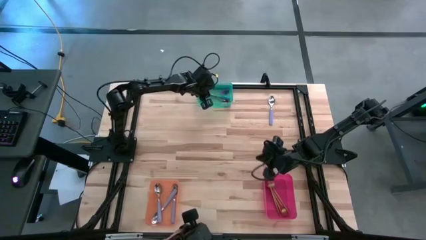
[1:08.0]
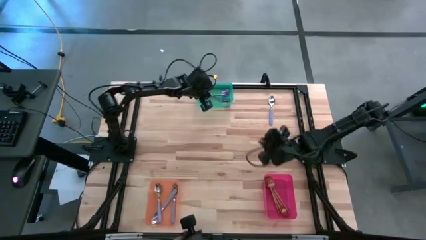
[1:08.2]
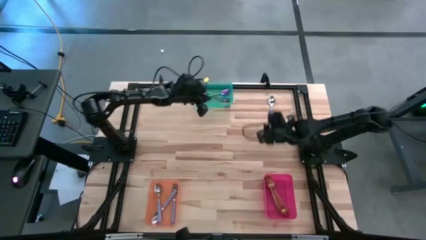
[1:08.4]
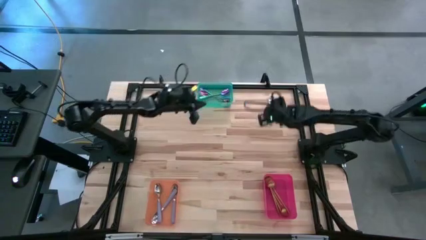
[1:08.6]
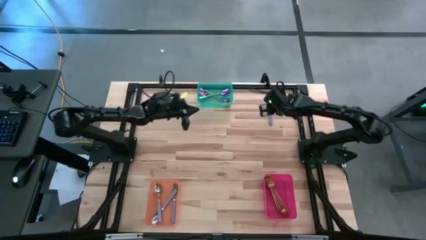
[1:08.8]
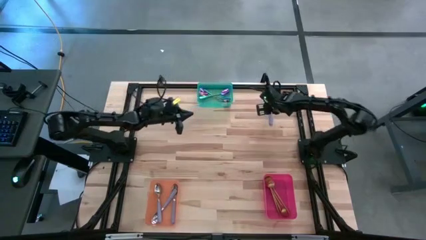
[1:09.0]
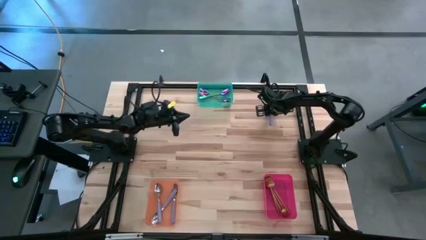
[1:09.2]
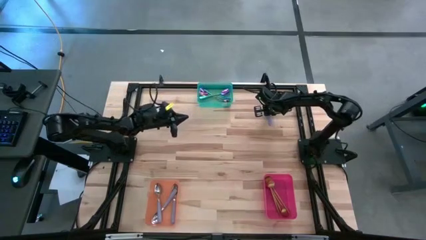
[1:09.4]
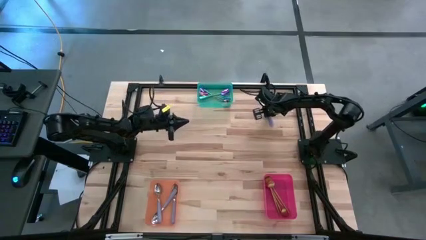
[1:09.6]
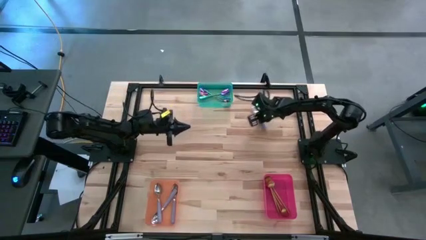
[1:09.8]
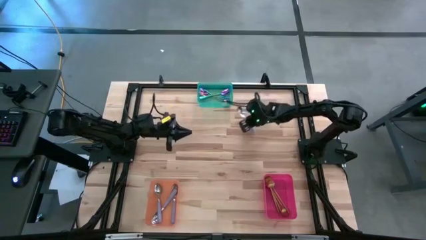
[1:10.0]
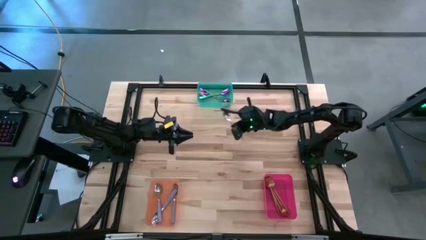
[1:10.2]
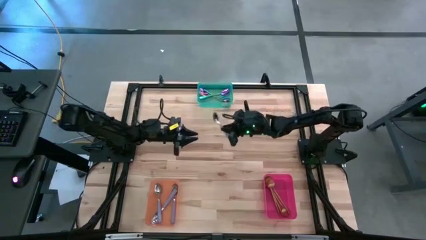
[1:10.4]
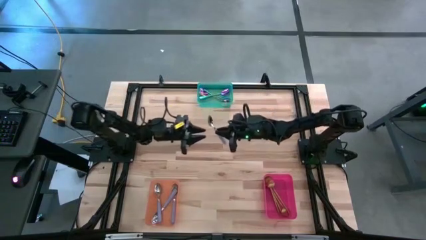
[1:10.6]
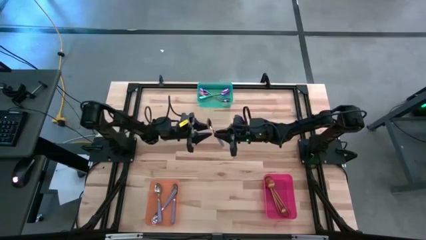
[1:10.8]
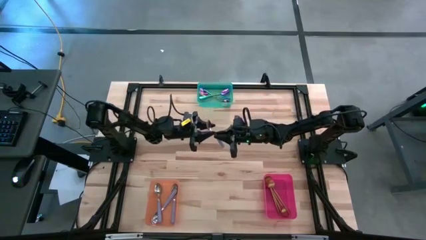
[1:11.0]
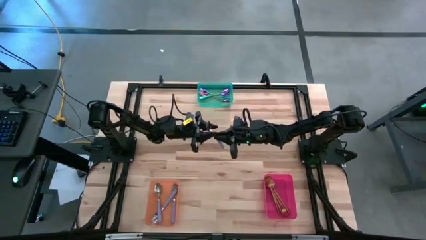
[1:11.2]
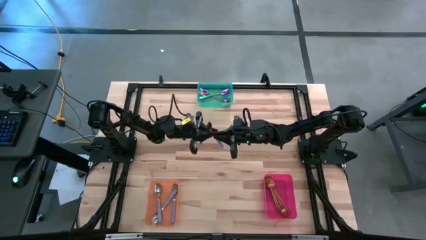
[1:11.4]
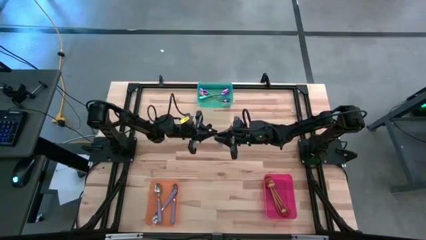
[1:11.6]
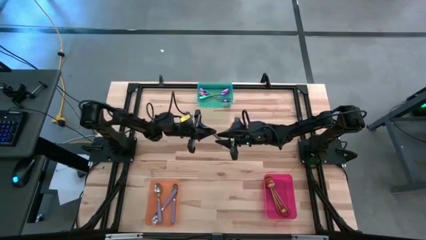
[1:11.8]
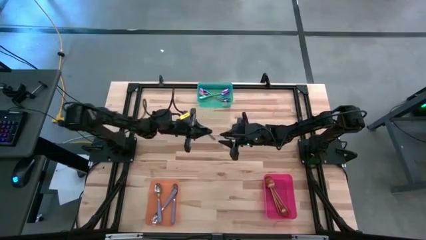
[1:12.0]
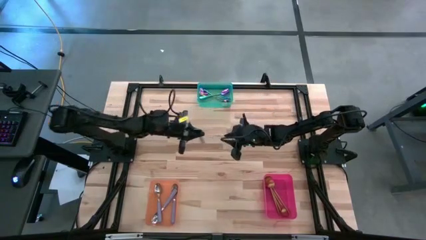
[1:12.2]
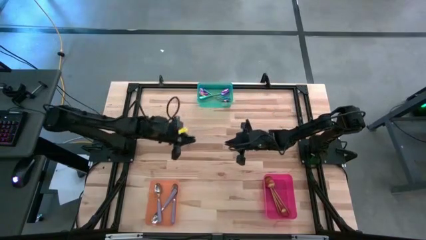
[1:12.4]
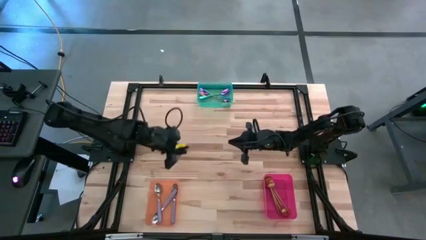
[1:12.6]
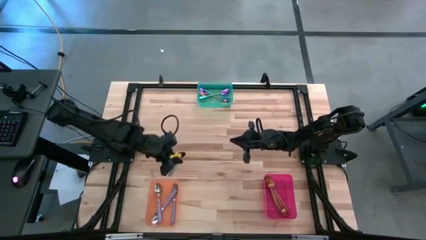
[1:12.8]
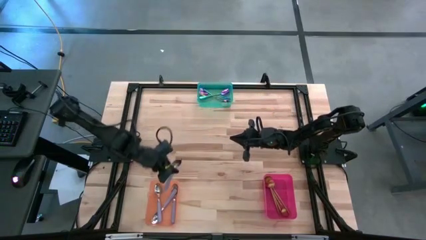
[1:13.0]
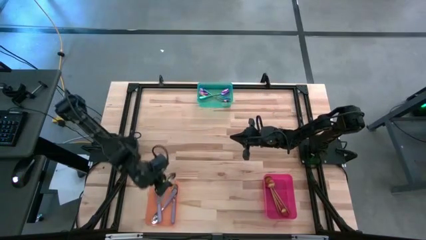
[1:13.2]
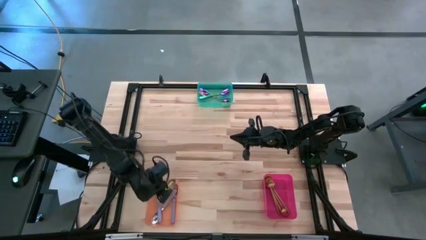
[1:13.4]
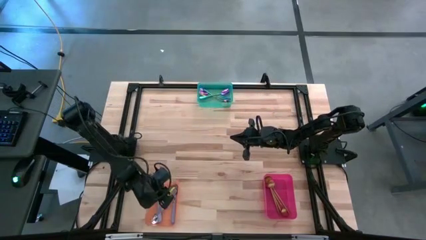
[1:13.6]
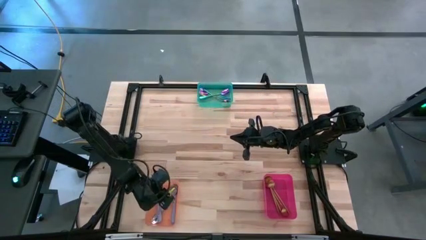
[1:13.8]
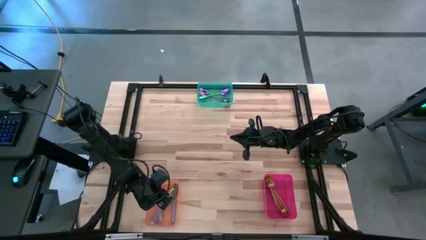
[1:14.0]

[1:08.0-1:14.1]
Task: Sort silverware by color (type)
Put the purple spoon into the orange bin

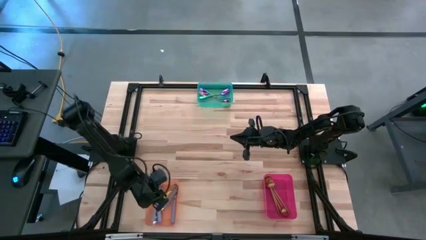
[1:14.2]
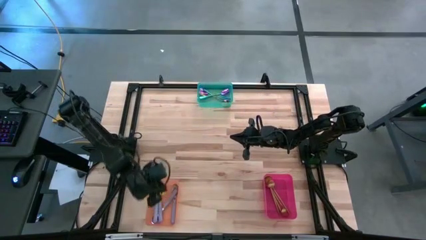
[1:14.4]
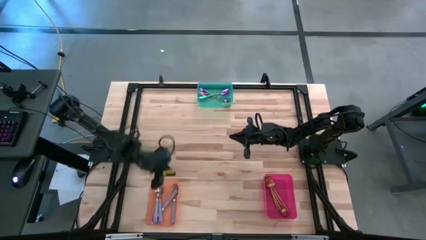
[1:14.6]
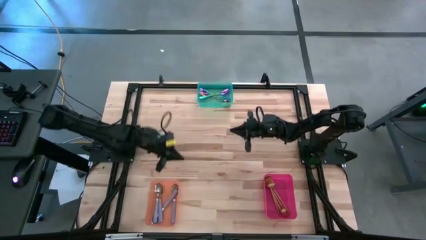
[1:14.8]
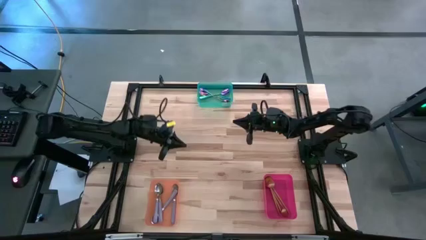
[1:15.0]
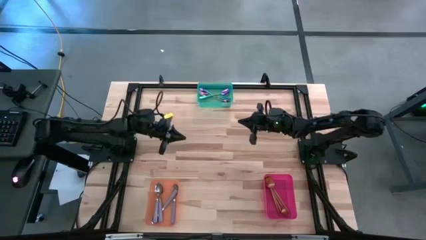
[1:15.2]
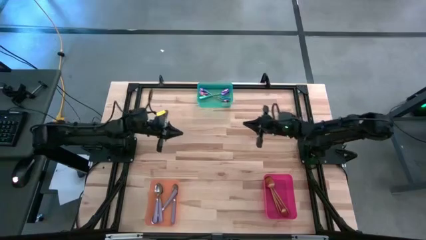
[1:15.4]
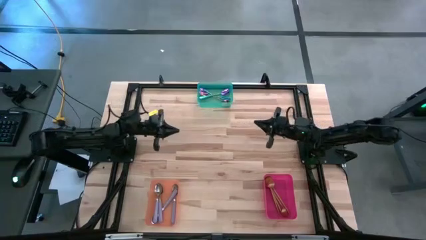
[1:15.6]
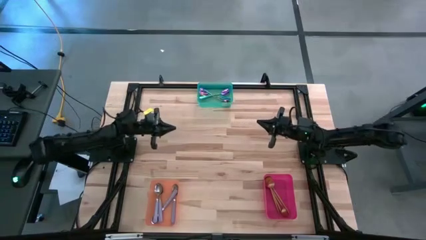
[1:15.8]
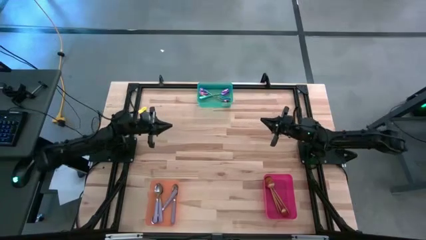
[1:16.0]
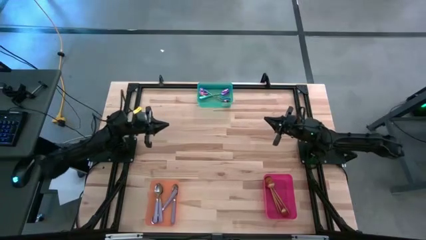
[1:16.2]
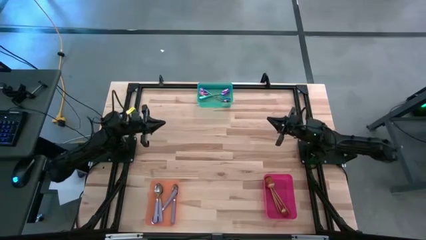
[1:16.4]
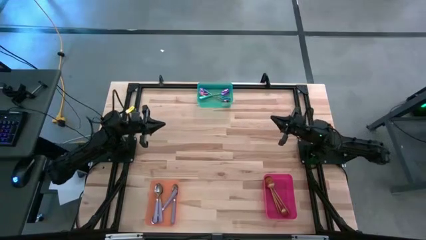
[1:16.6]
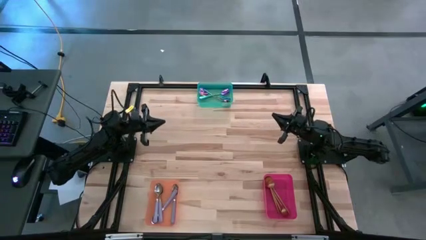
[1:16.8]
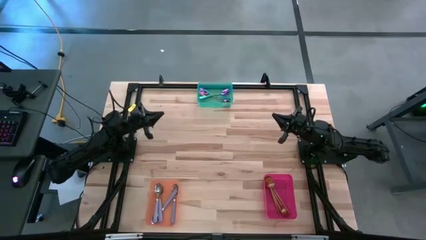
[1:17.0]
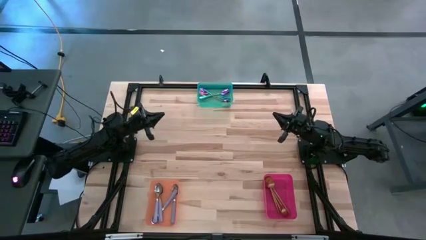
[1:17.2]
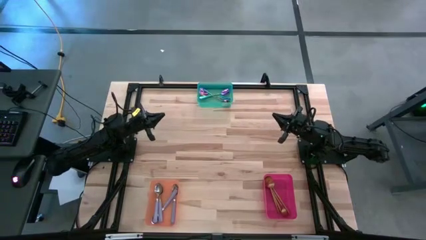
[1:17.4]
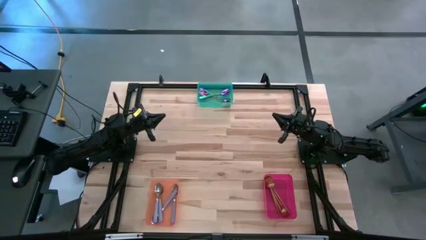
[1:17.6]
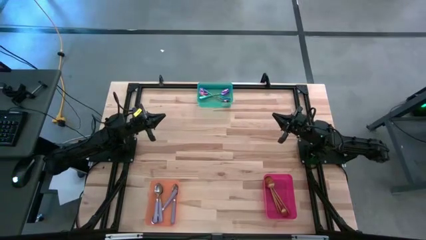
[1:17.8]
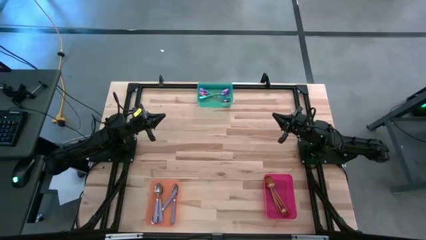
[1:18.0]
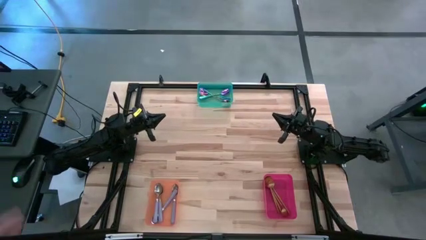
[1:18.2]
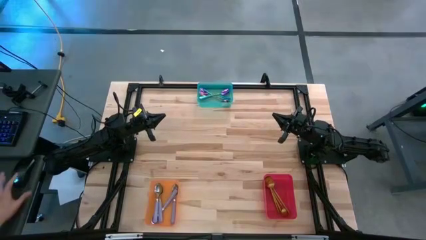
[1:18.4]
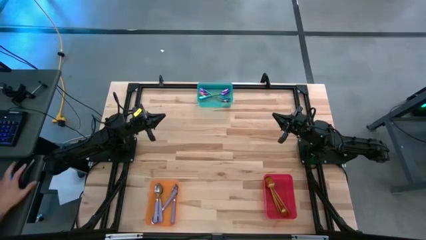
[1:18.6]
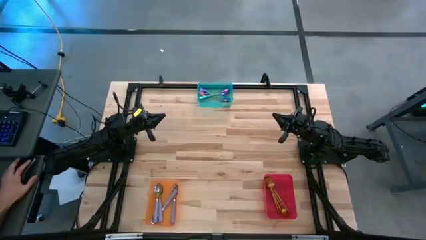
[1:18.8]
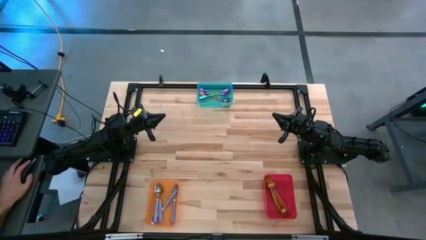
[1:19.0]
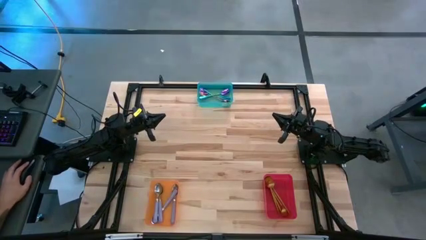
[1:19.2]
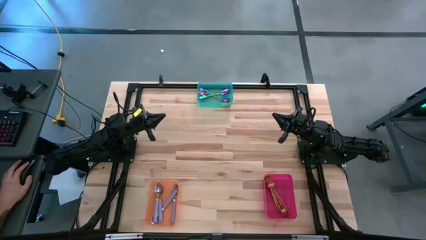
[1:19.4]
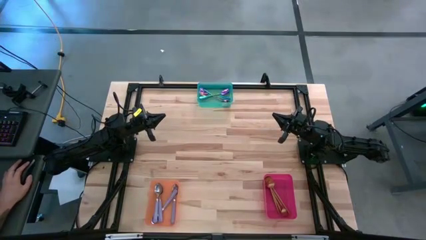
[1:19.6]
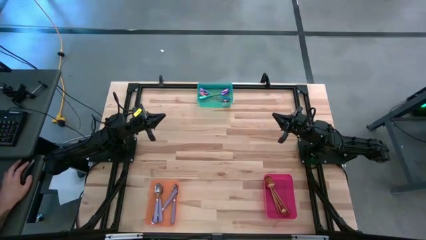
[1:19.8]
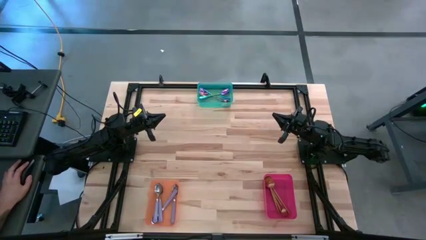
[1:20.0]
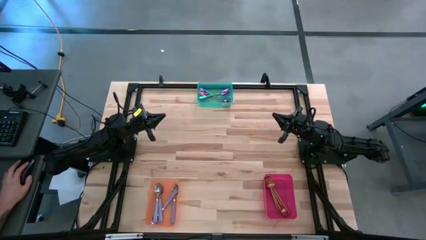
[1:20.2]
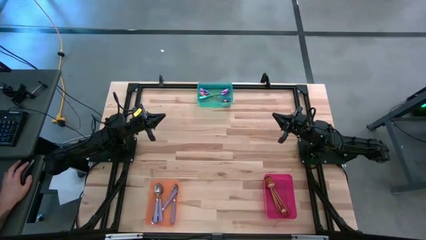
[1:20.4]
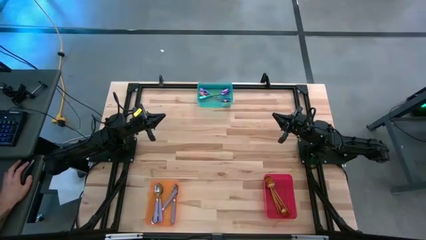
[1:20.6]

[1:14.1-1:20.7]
Return to Home Position

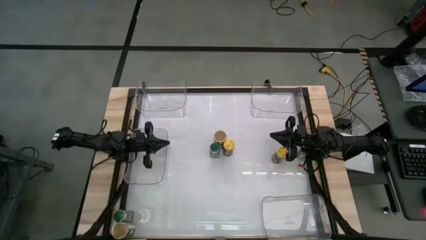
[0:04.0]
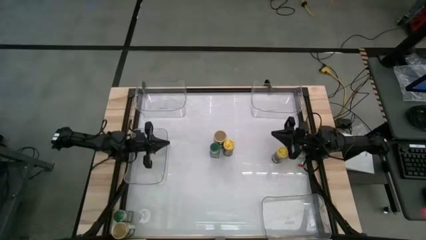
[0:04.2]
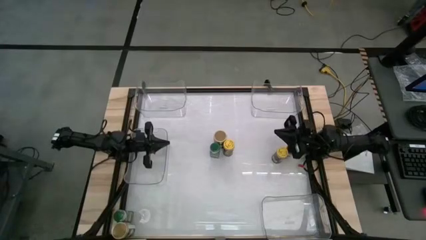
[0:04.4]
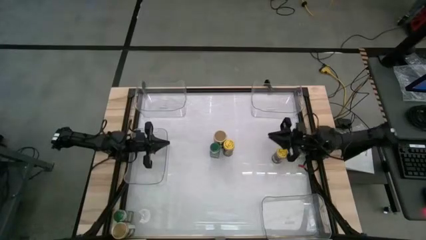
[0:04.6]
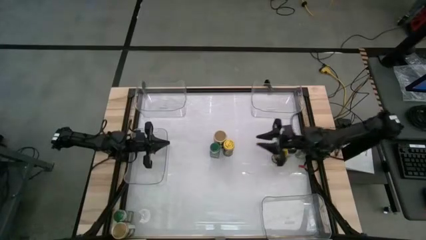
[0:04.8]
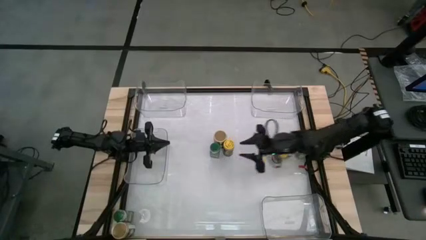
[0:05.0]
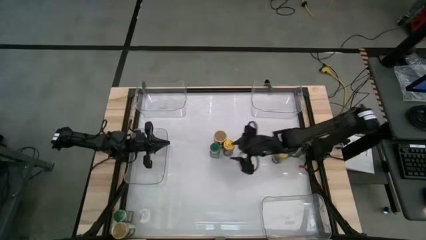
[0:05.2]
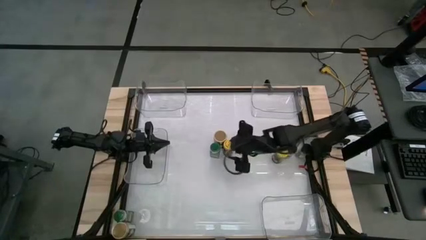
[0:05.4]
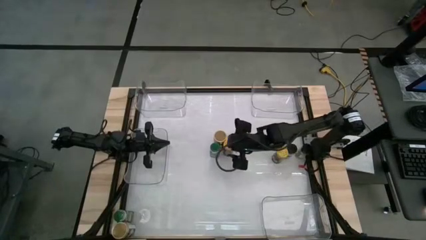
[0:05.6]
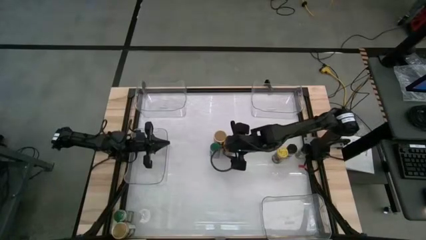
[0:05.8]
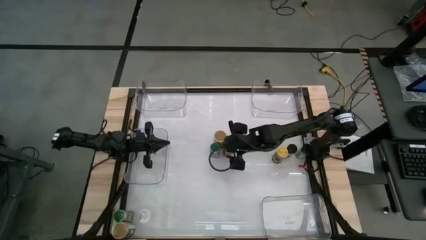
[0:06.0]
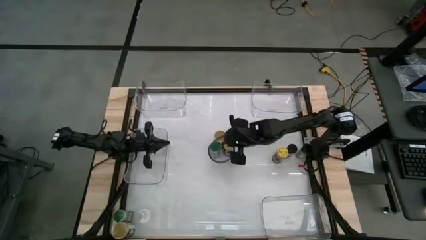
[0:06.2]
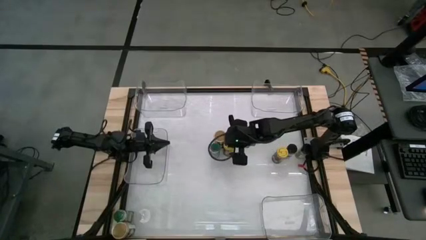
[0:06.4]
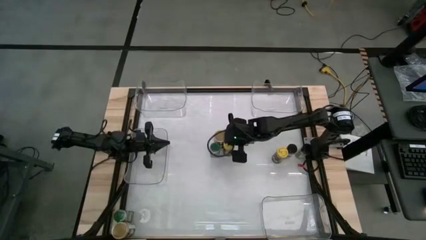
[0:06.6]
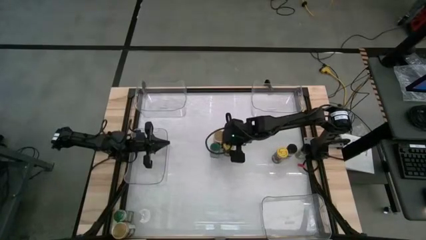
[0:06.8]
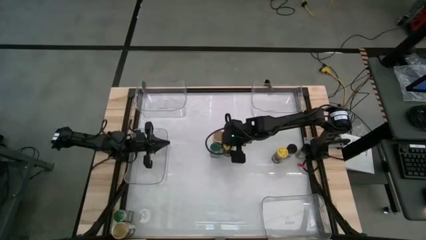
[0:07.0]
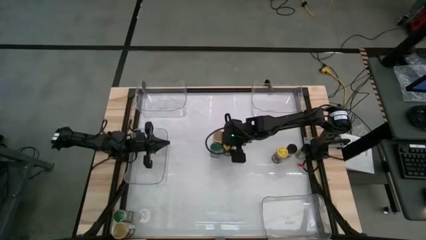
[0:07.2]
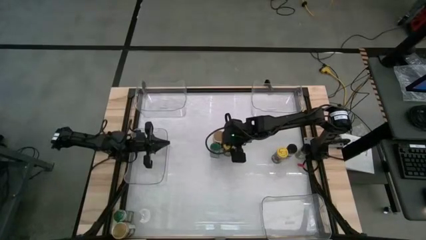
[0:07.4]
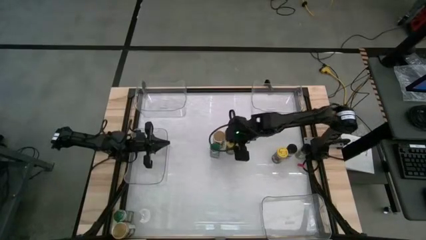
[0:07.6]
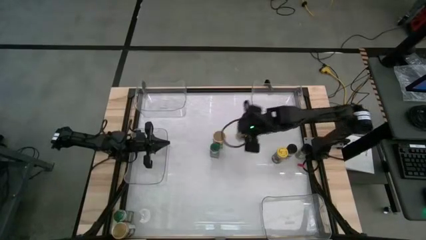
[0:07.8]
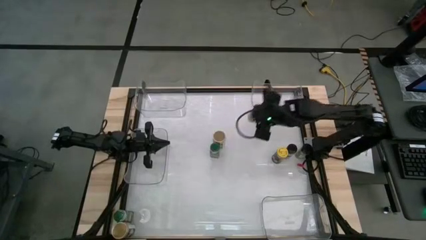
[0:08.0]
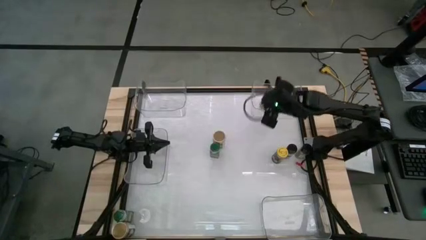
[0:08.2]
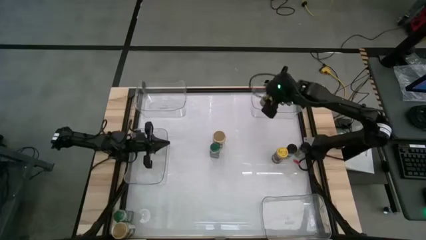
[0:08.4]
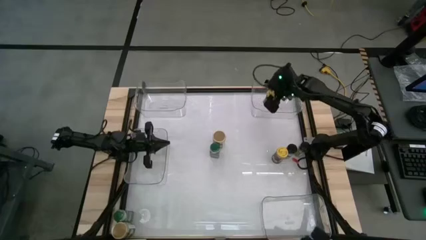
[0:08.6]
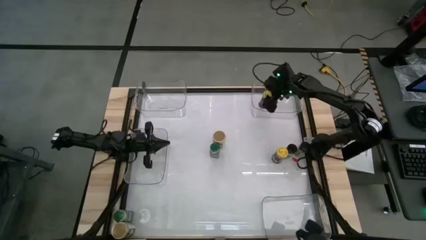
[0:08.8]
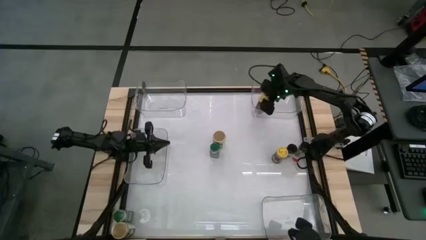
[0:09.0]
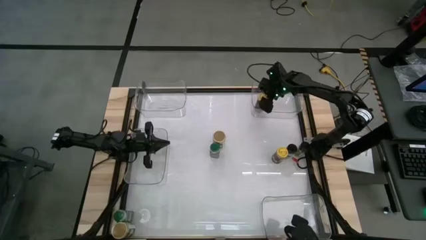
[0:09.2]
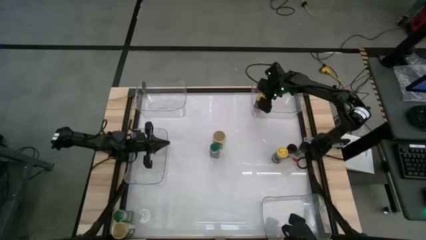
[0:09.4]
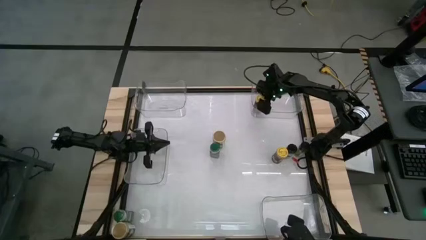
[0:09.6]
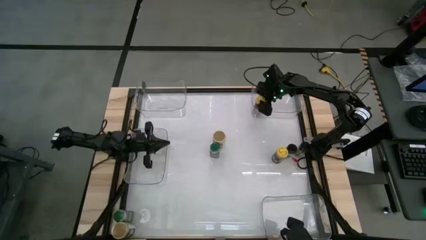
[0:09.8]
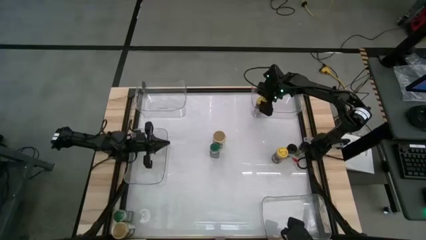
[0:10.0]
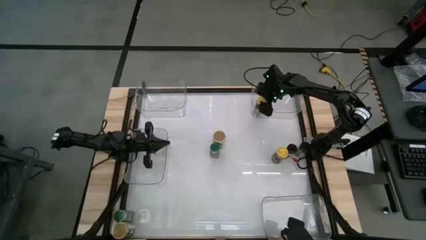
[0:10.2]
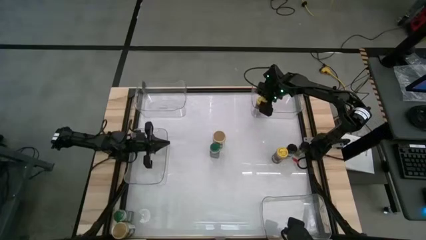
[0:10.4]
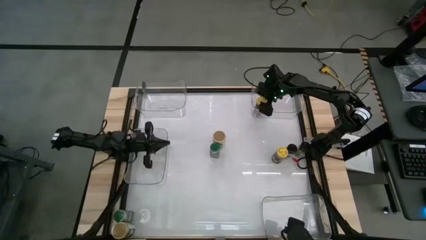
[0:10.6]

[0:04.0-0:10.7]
Task: Sort spices by type
Put the left yellow seasoning bottle into the top right transparent bin
